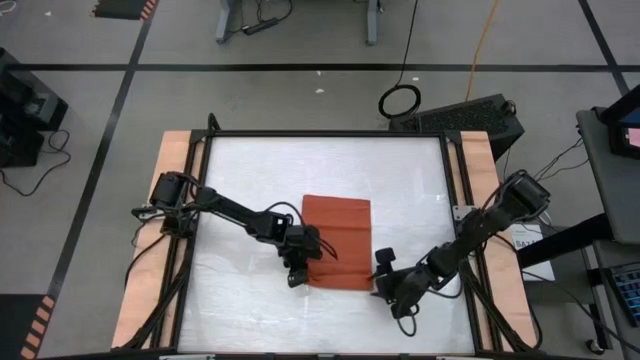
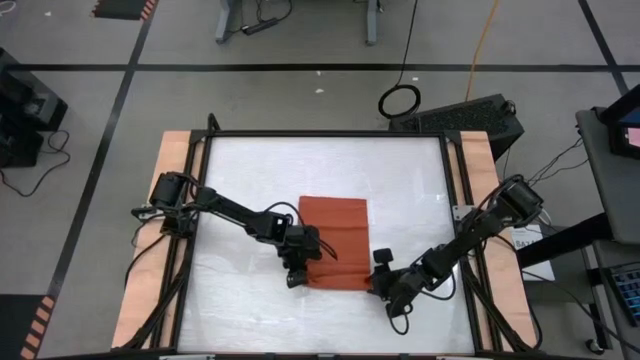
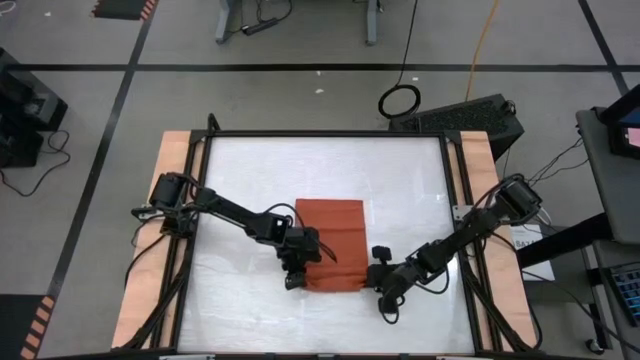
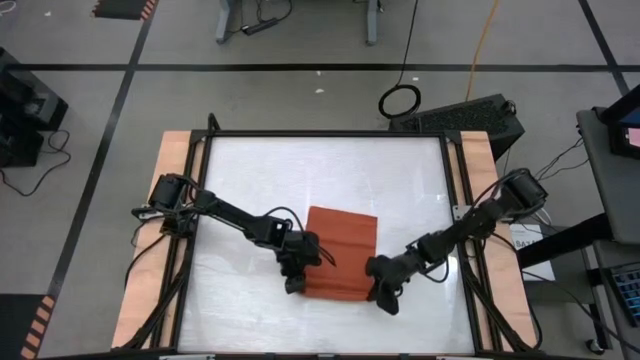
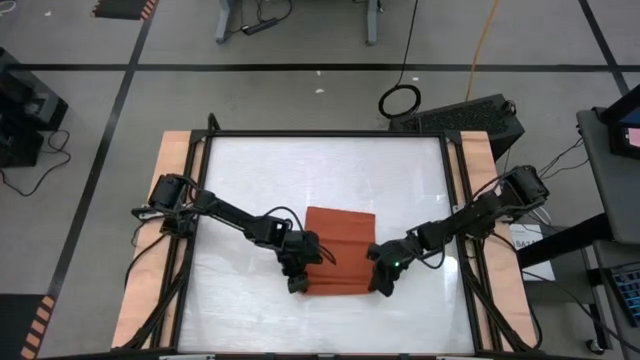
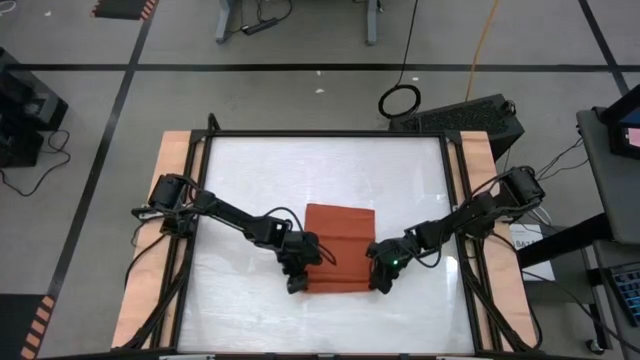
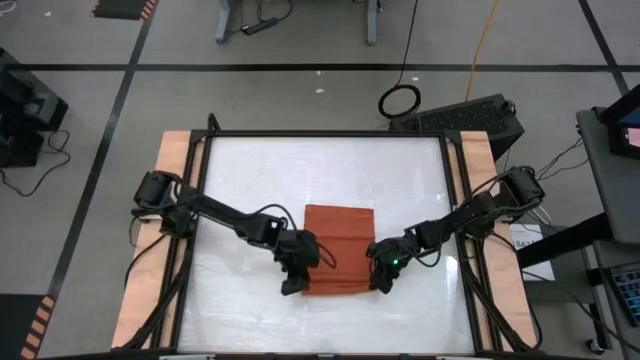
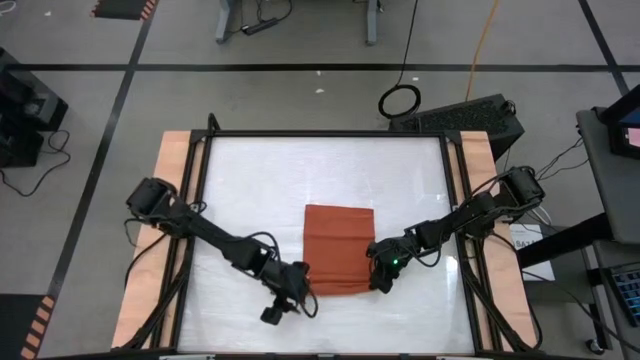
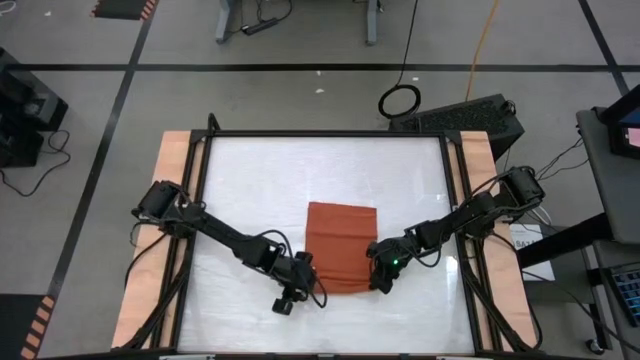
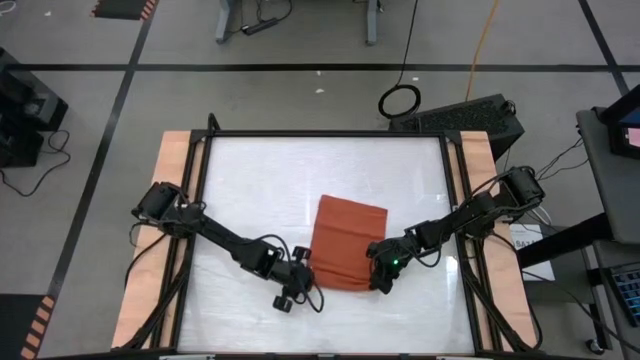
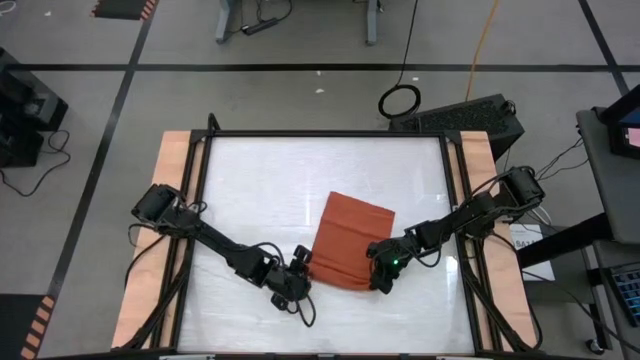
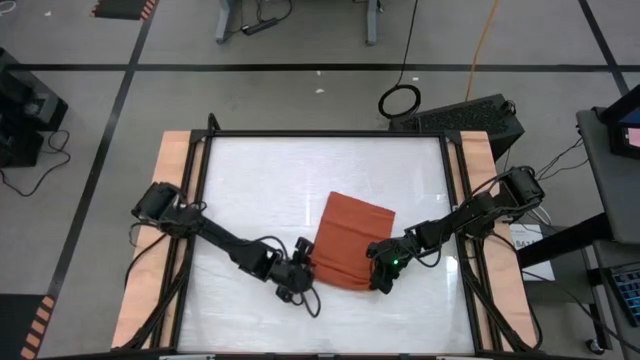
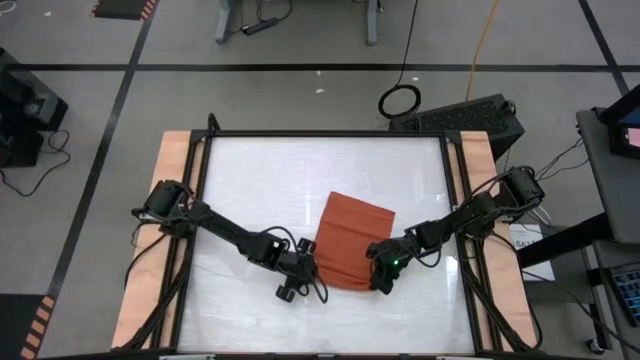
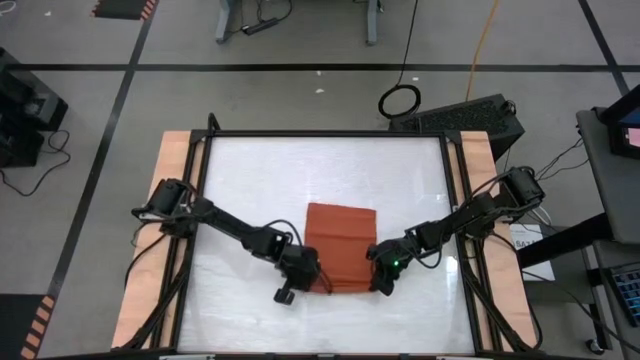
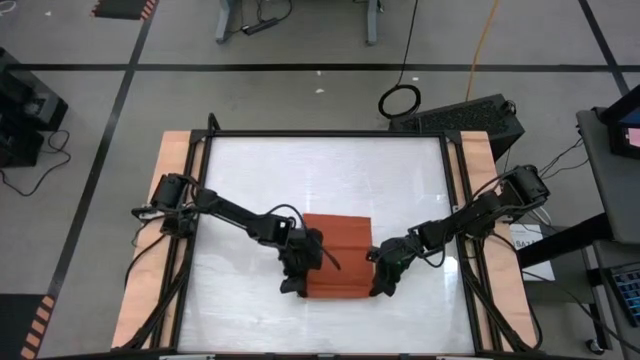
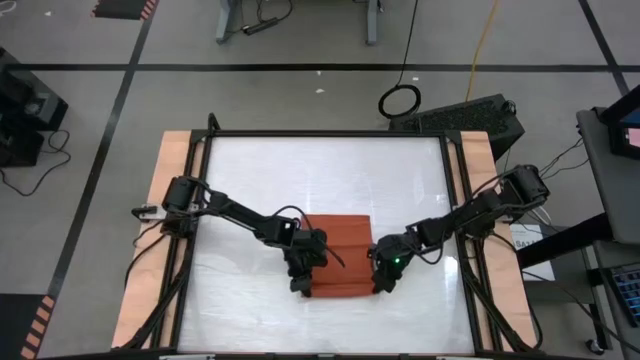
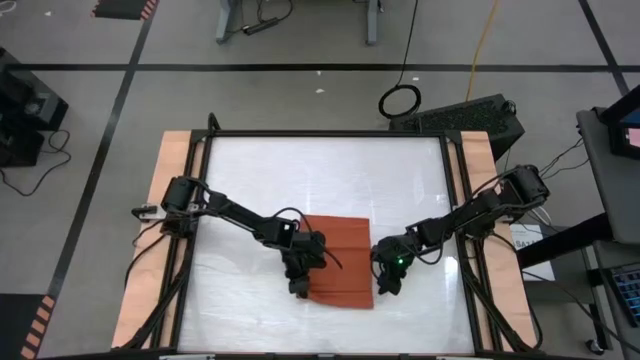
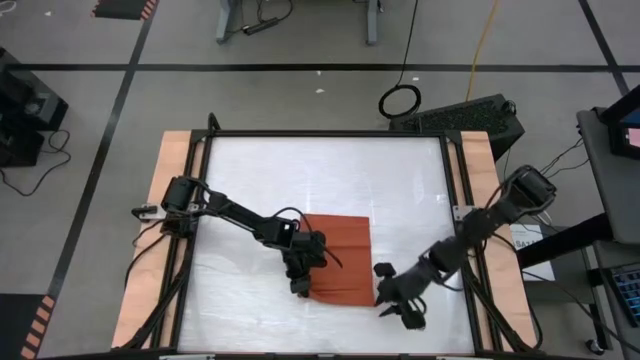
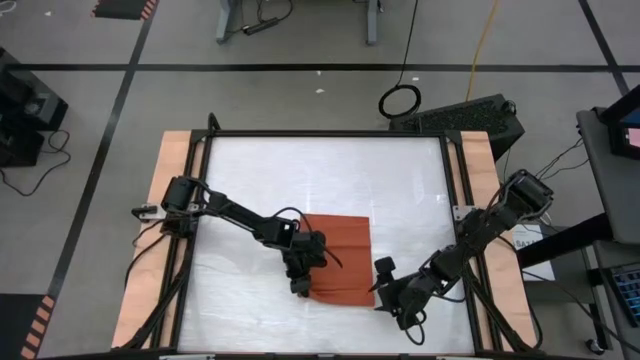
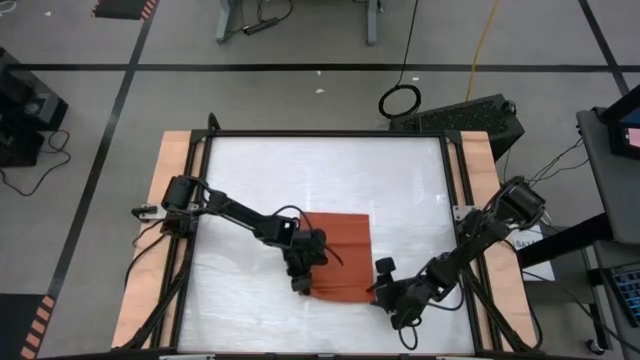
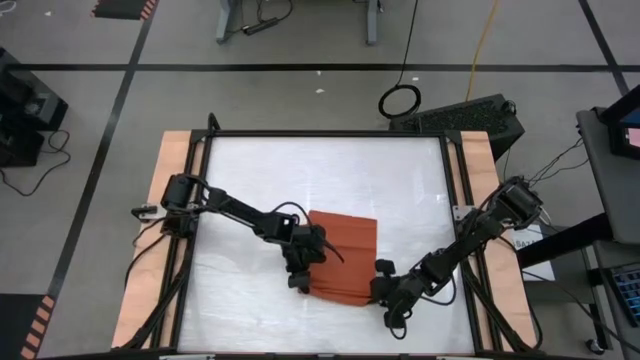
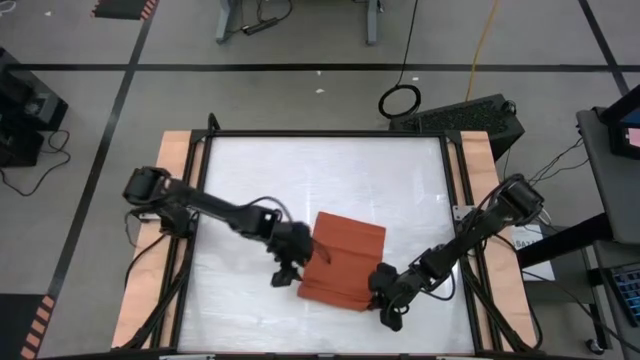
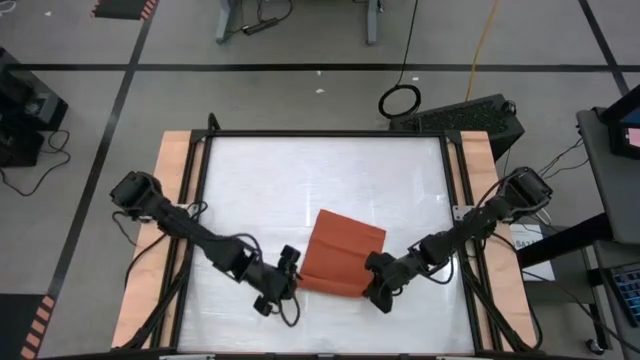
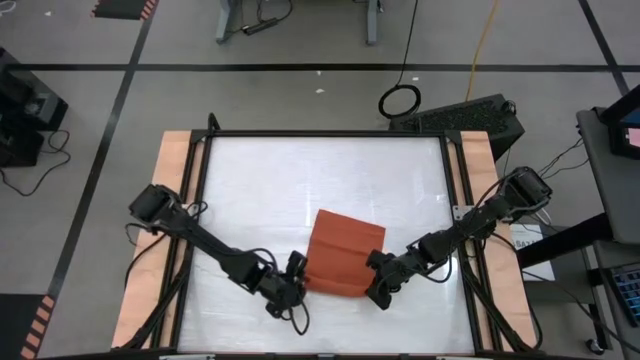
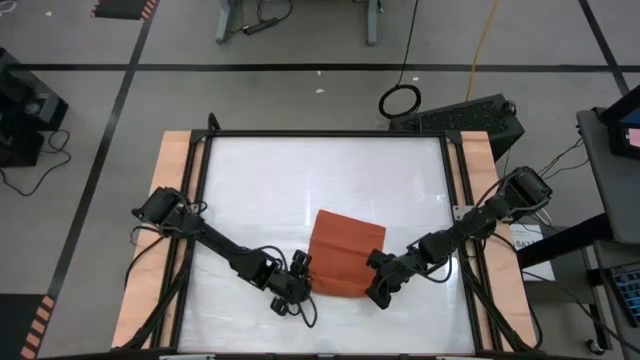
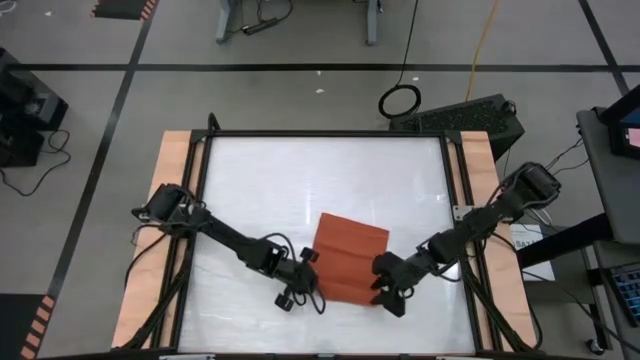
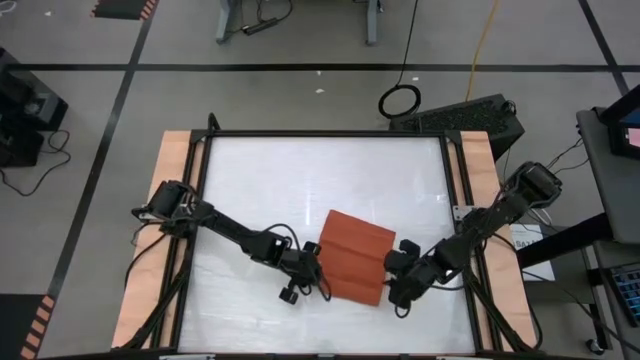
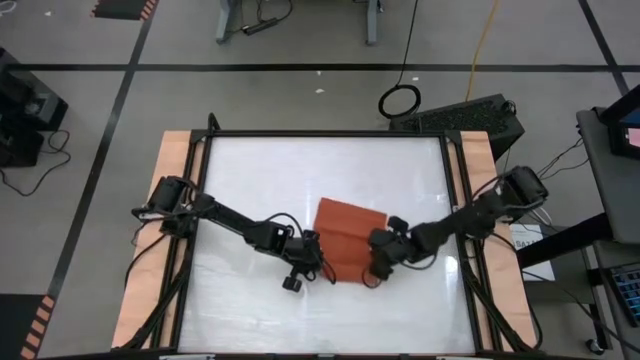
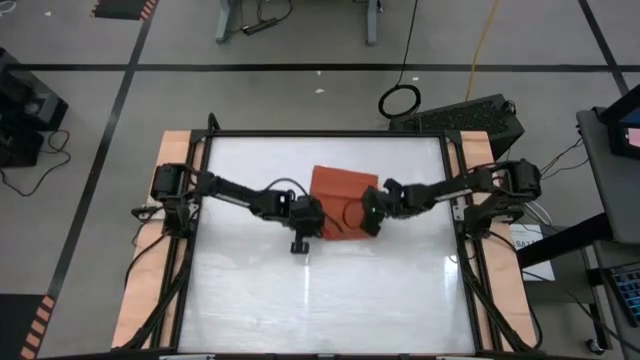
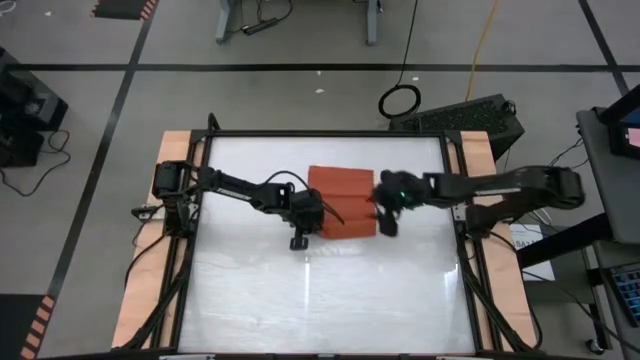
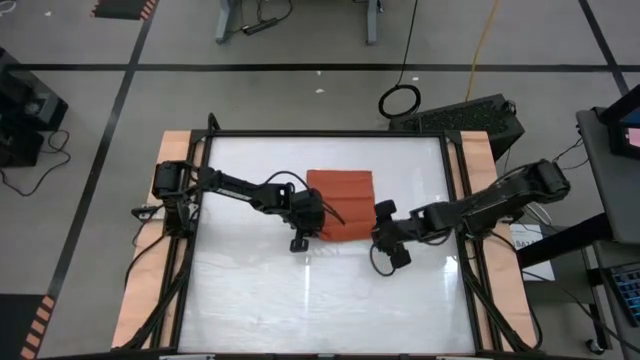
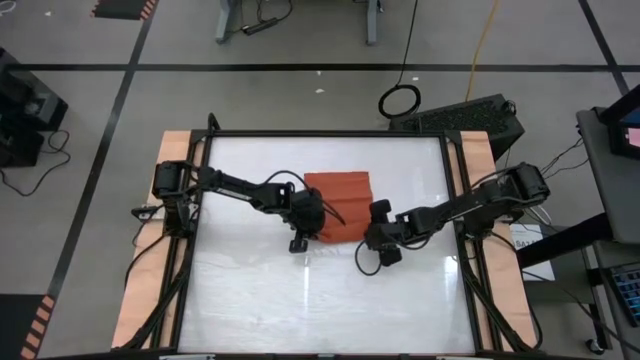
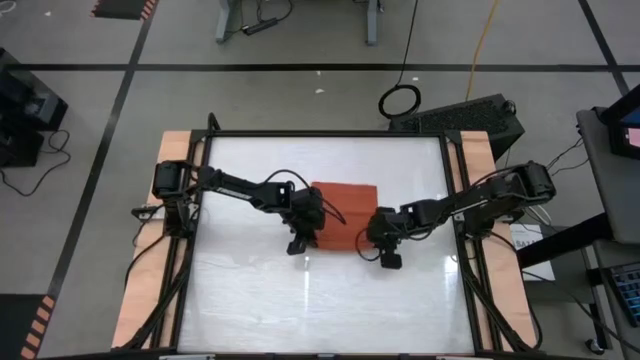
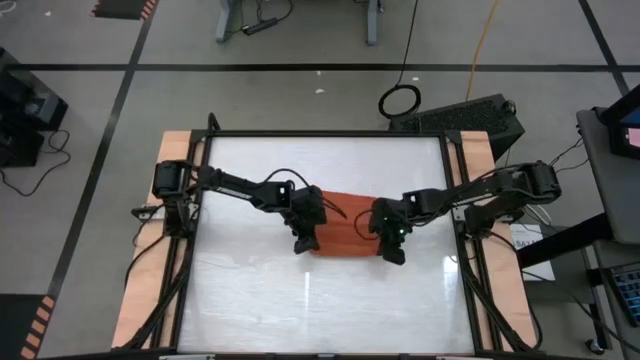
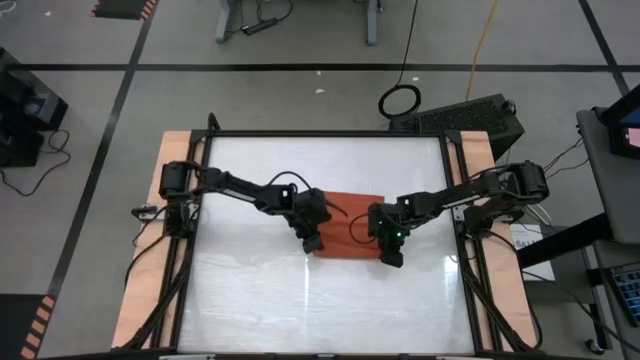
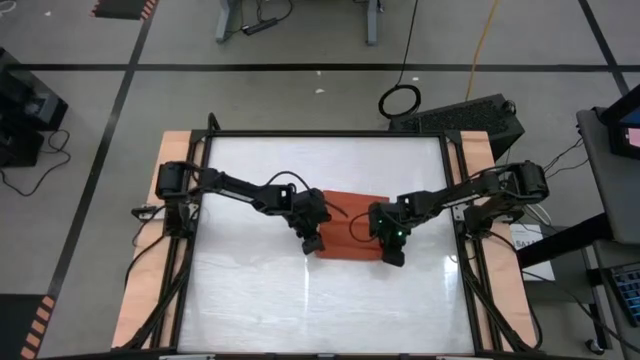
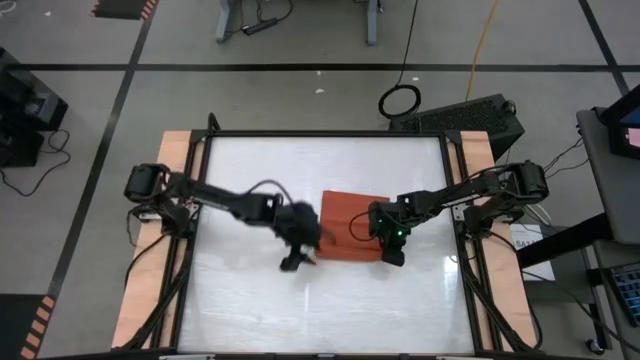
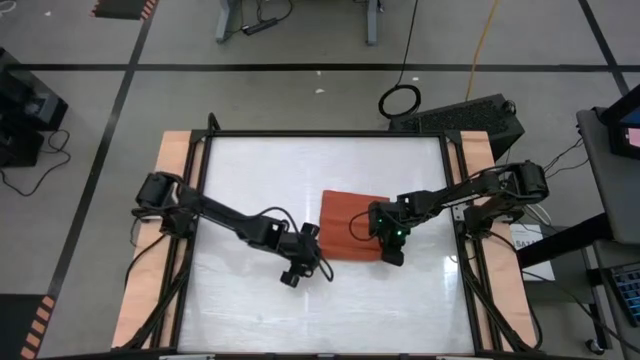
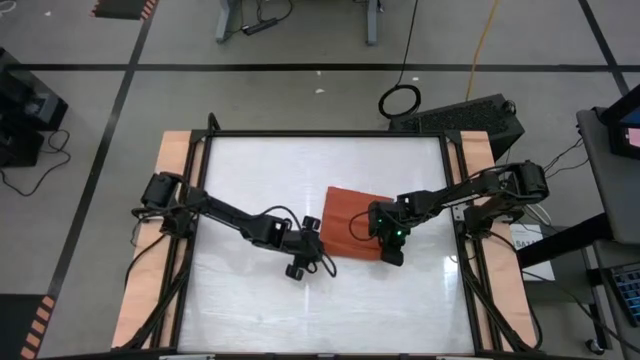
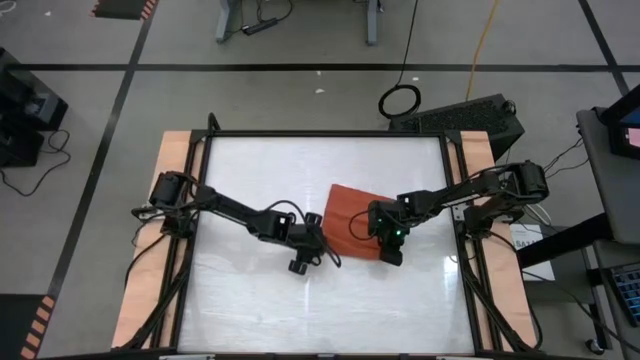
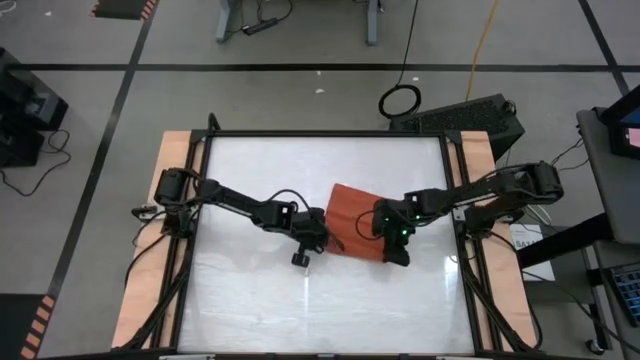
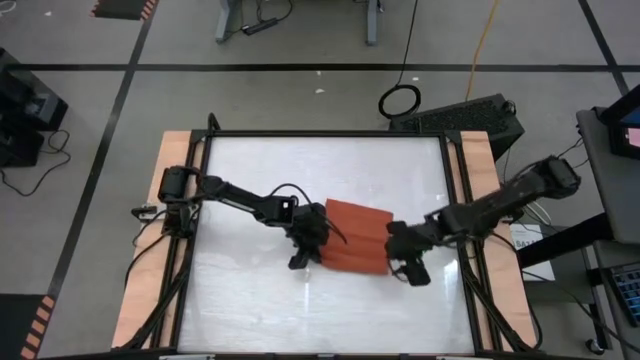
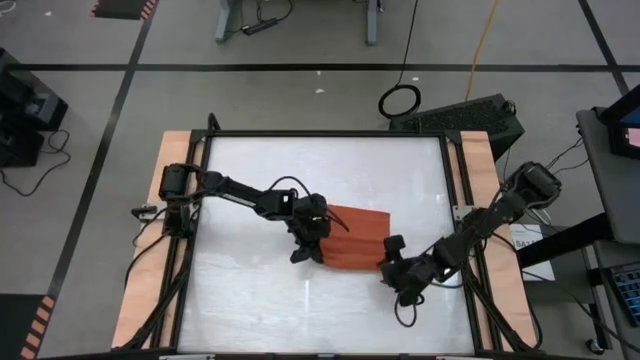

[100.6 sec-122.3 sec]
Task: Roll towel into tight, uniform cylinder
Roll the kitchen towel
